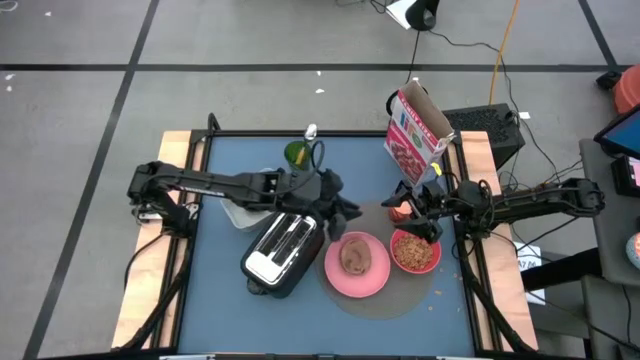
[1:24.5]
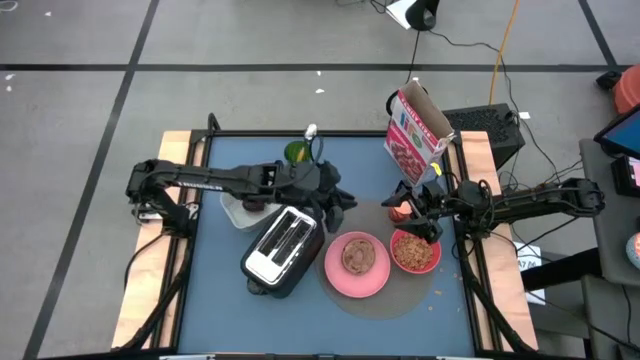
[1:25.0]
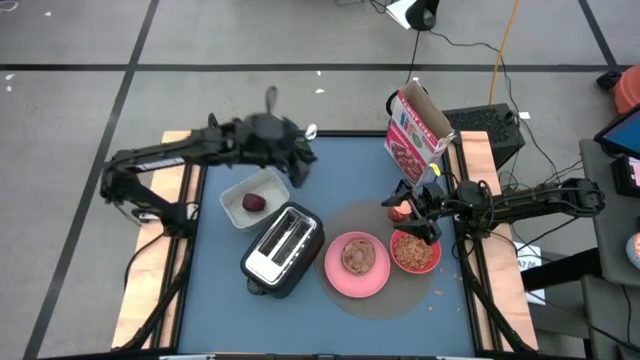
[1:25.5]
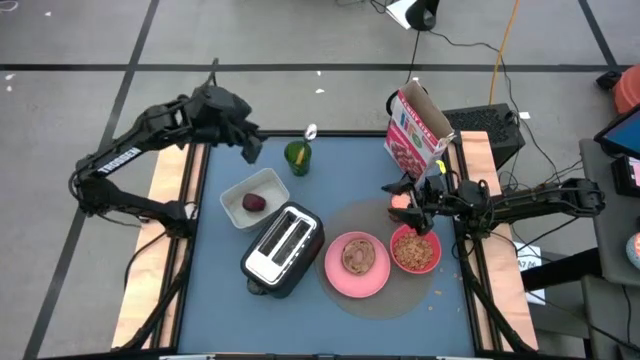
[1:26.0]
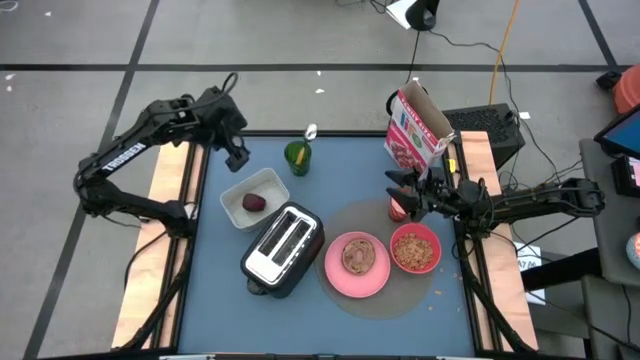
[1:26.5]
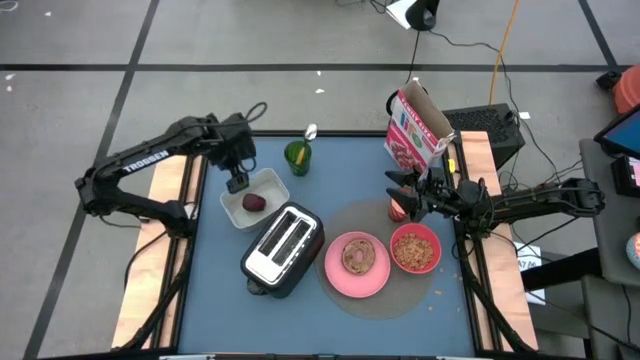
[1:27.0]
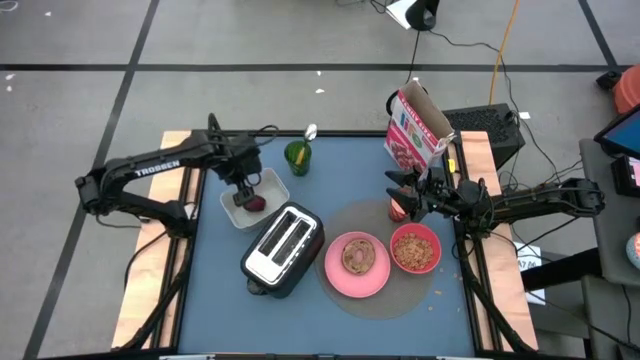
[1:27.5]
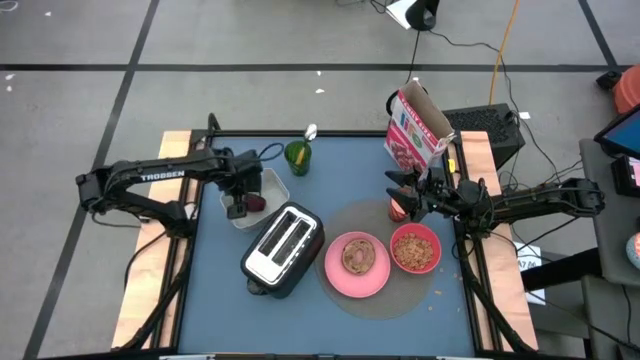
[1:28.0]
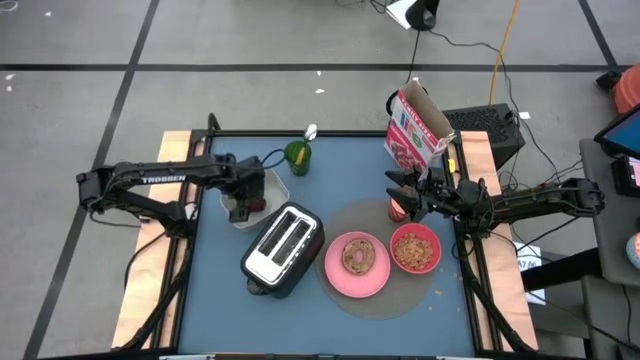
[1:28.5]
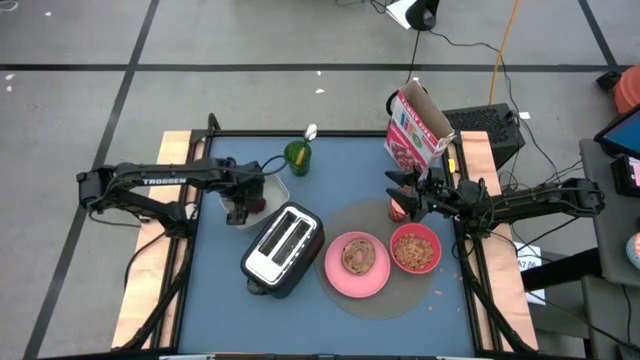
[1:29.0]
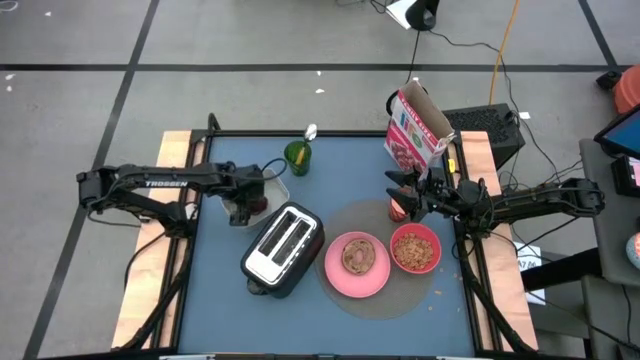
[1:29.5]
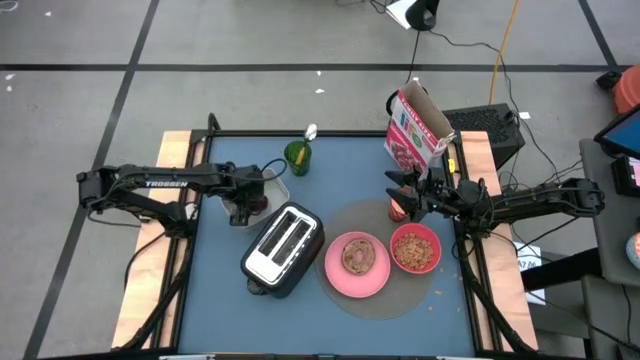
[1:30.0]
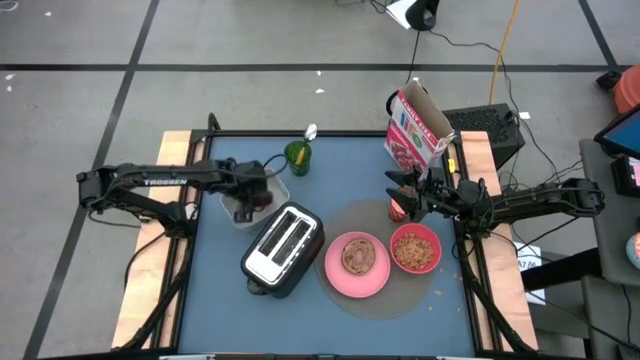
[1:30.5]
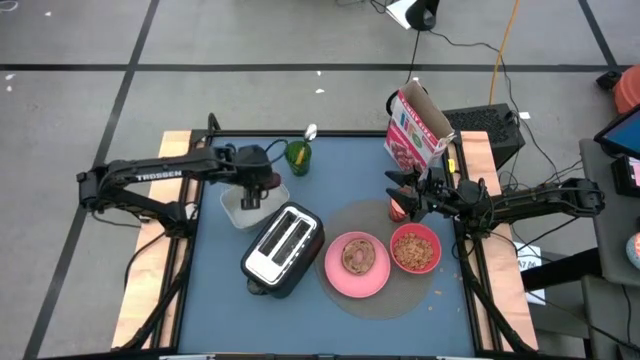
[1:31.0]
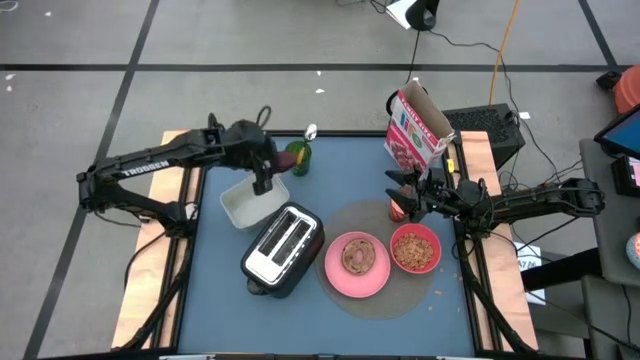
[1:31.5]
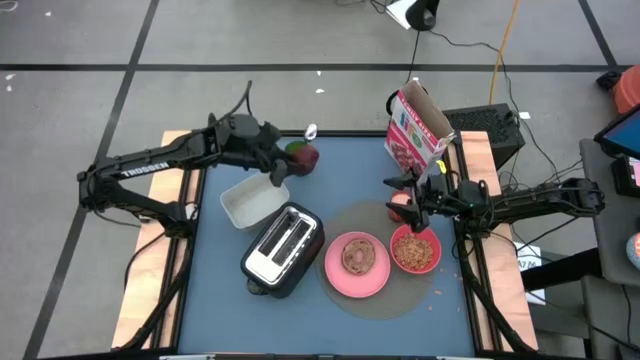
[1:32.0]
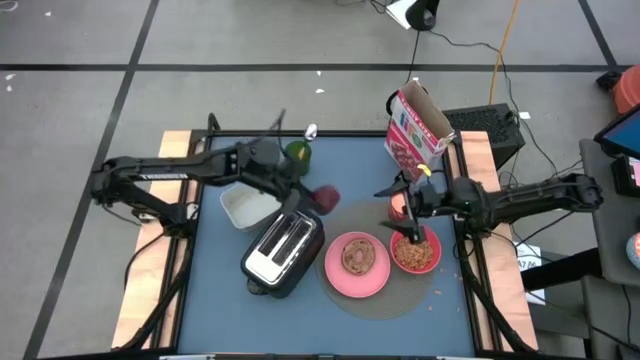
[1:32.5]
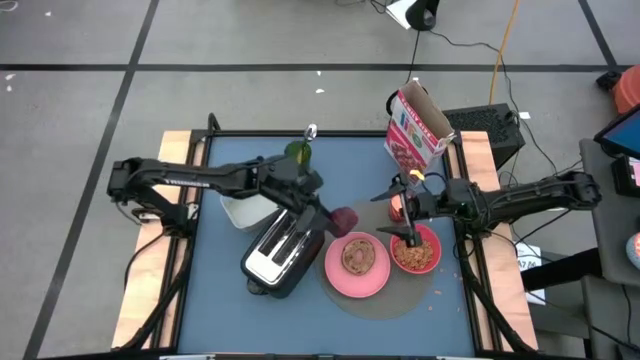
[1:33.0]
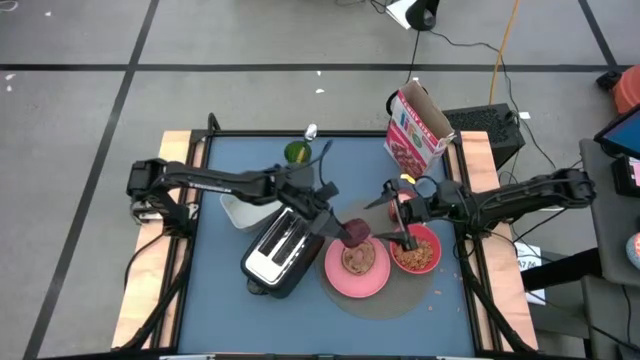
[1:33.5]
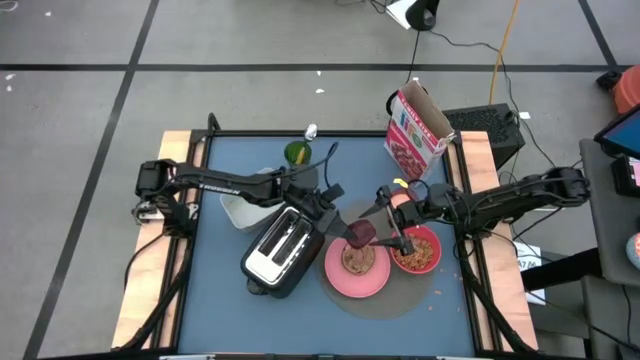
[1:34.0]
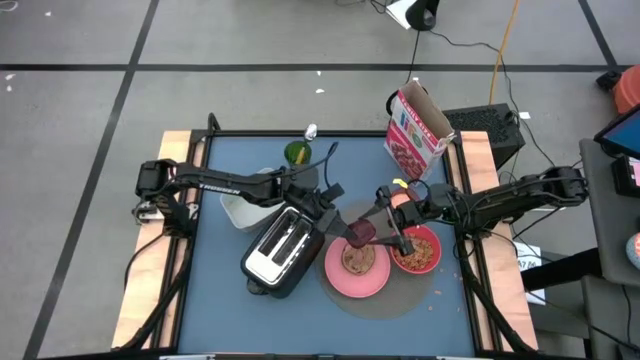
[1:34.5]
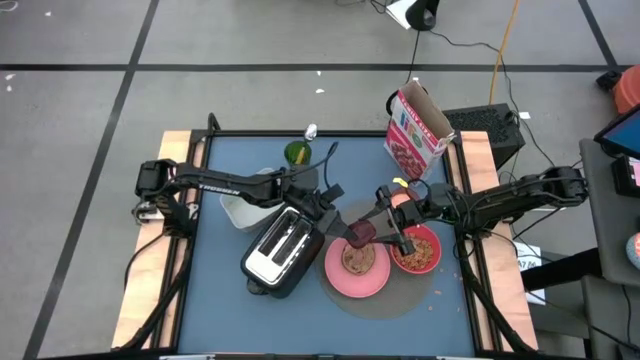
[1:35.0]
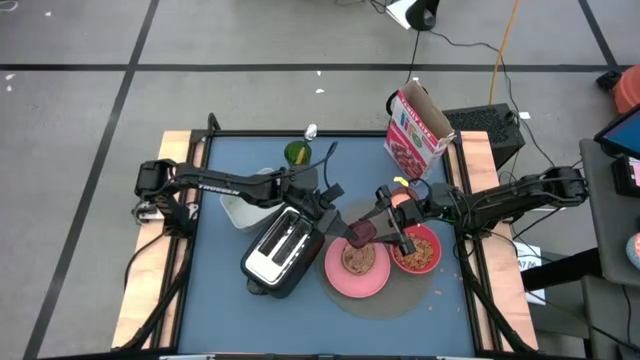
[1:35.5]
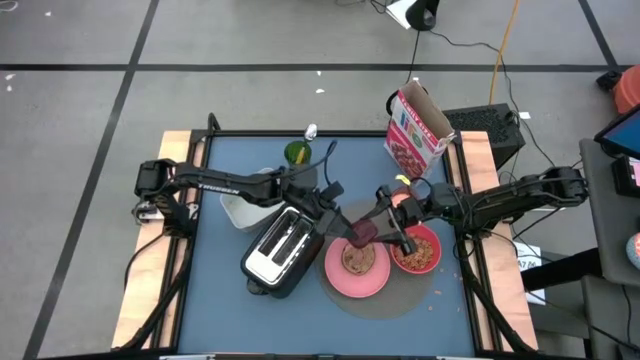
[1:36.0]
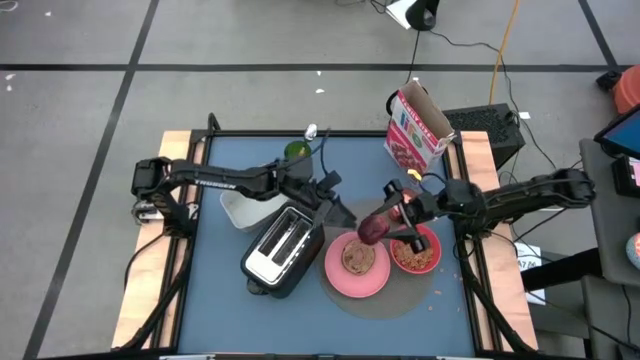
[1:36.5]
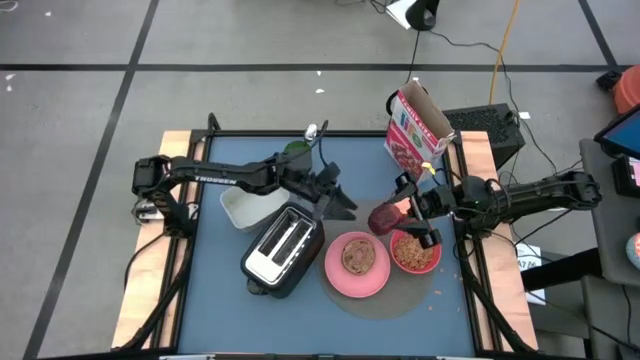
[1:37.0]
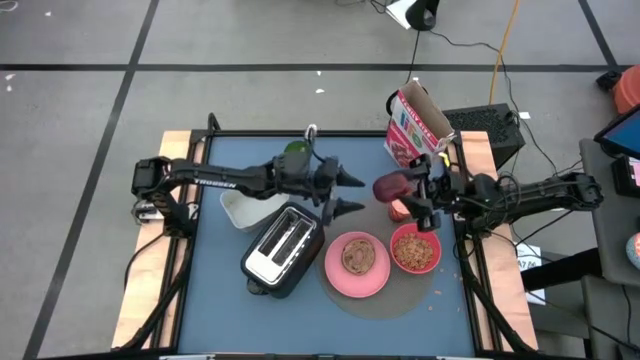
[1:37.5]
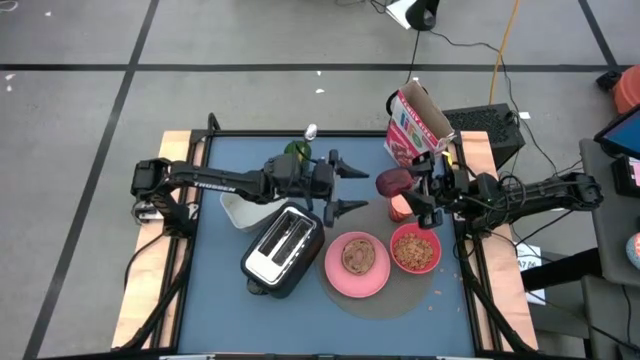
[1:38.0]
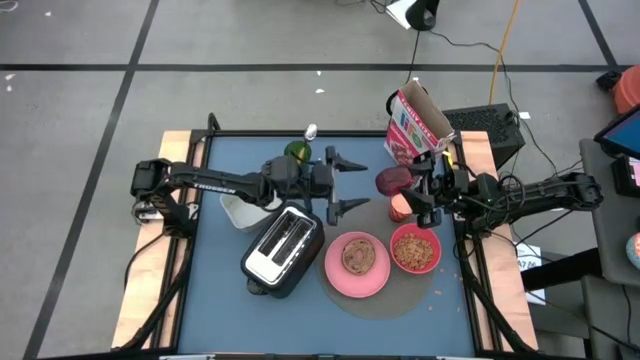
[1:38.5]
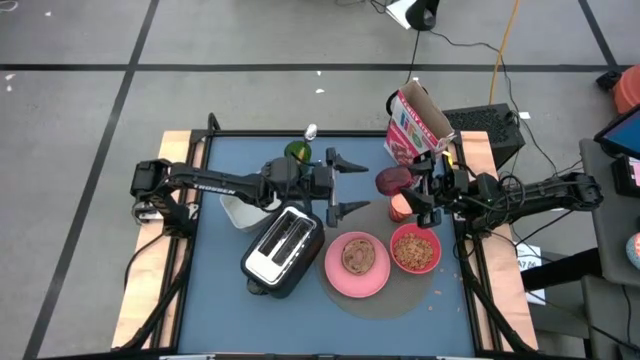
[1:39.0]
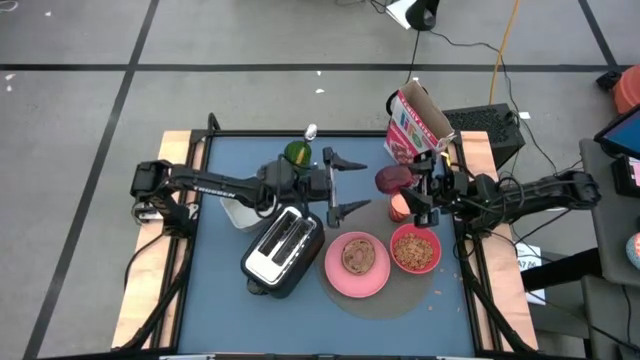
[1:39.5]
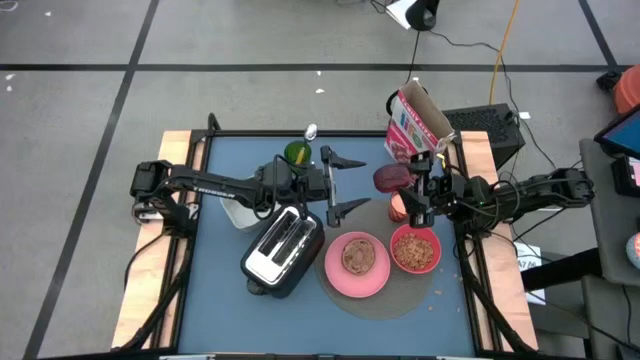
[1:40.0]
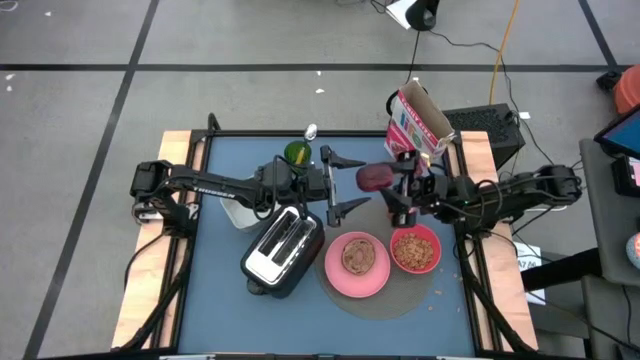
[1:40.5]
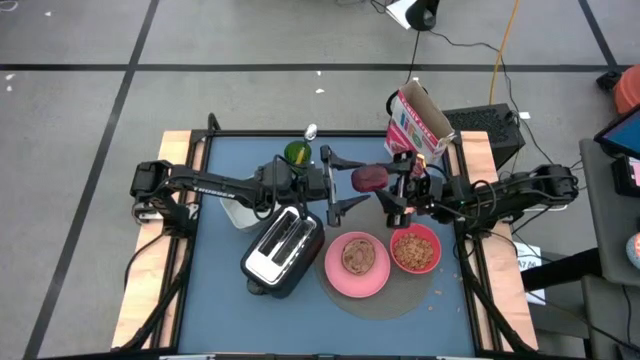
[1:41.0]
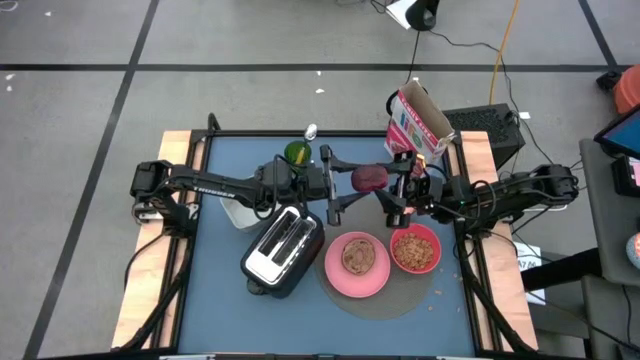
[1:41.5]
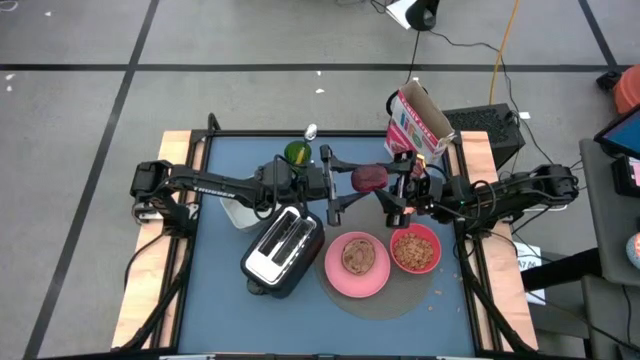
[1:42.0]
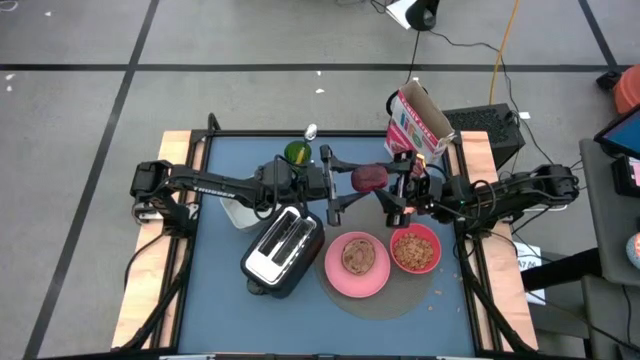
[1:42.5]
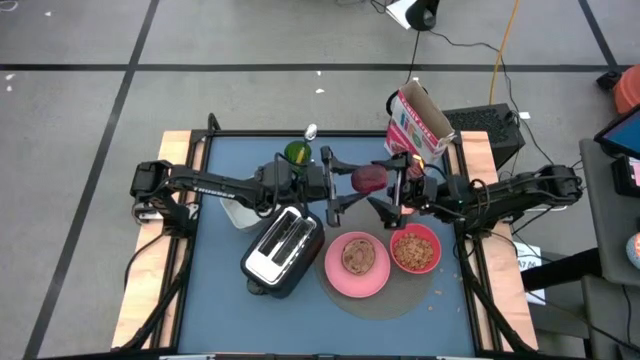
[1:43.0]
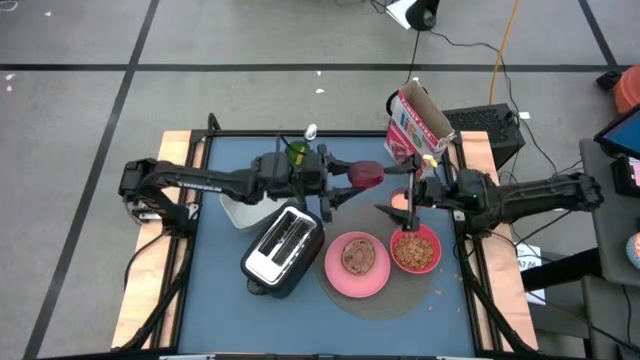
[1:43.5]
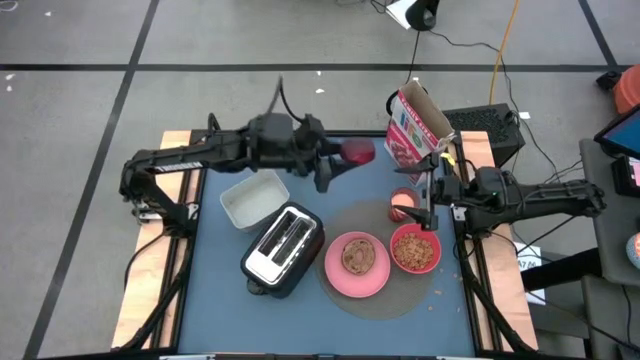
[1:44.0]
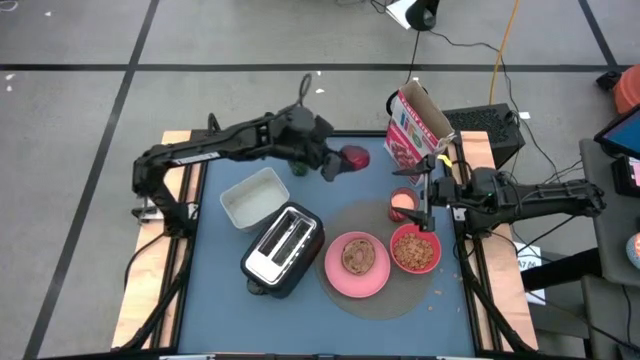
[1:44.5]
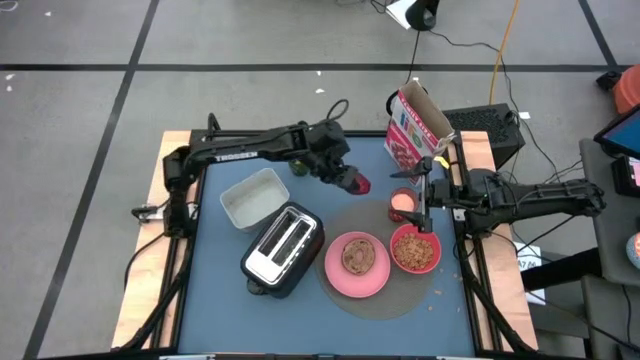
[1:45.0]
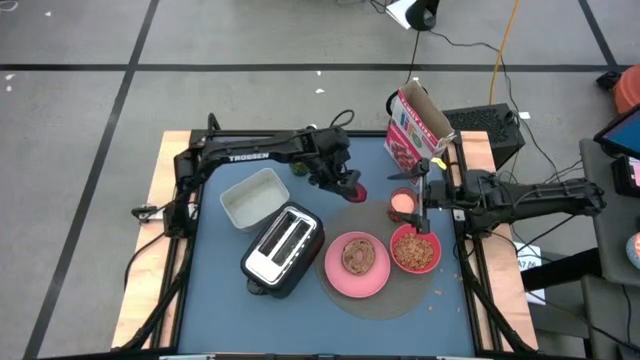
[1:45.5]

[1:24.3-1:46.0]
Task: Arrange a breakfast setting
Put the apple on the placemat to the top of the pink plate
